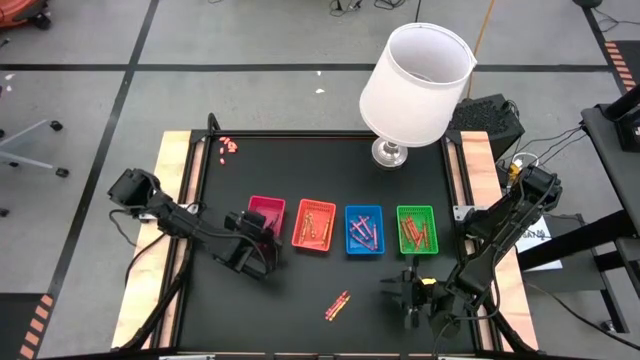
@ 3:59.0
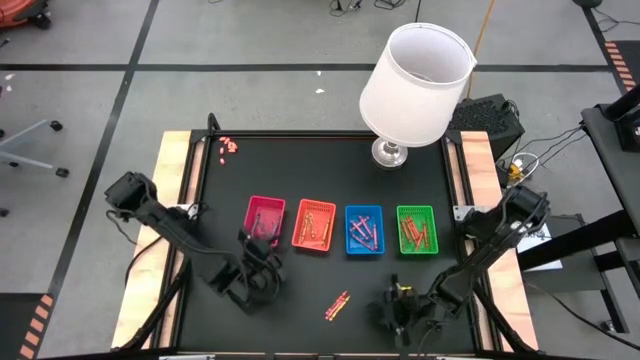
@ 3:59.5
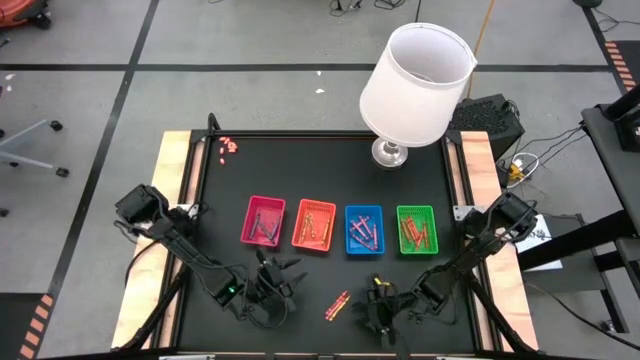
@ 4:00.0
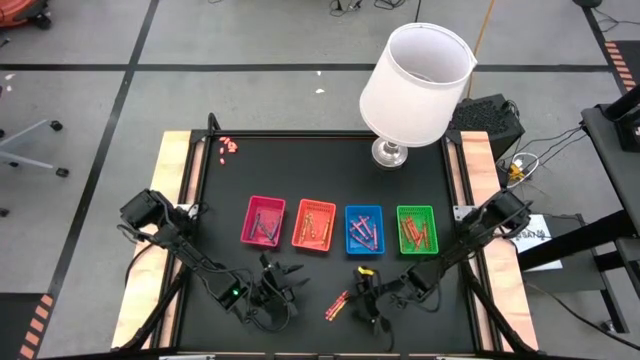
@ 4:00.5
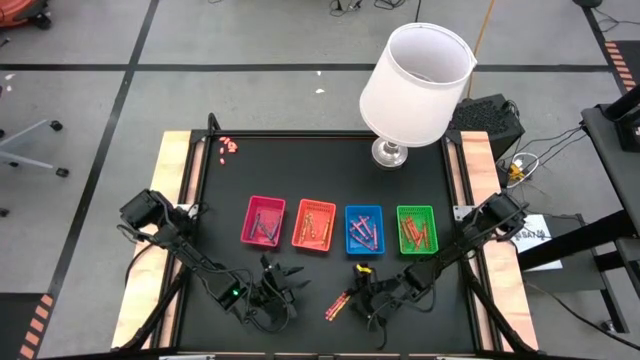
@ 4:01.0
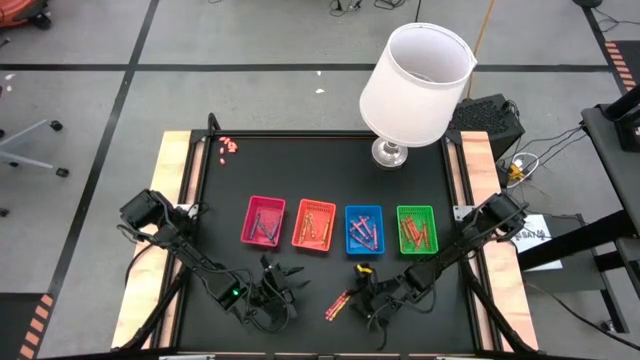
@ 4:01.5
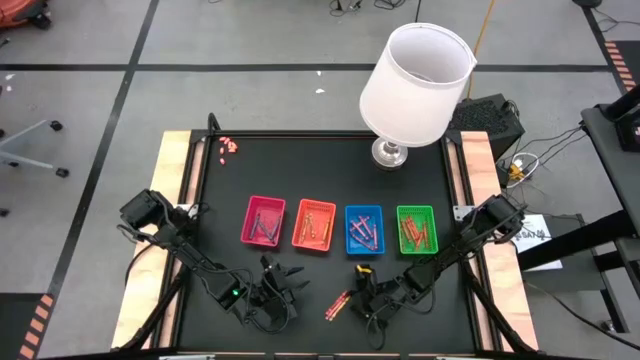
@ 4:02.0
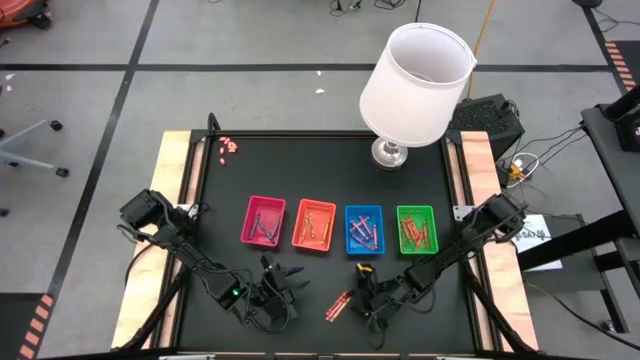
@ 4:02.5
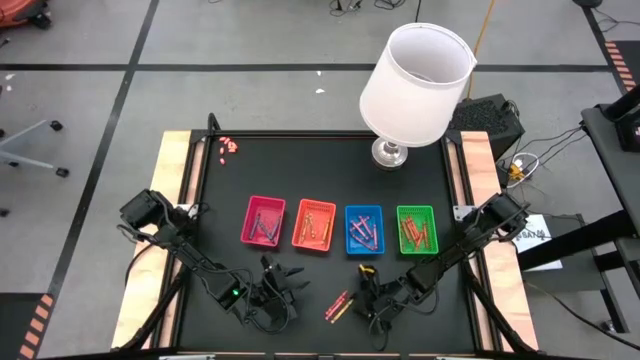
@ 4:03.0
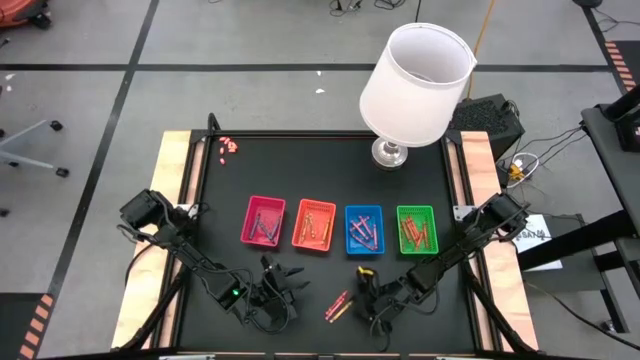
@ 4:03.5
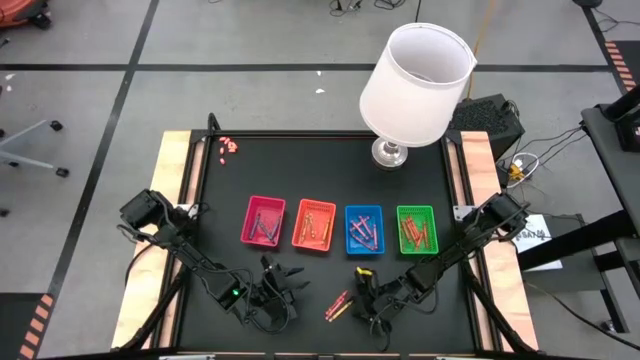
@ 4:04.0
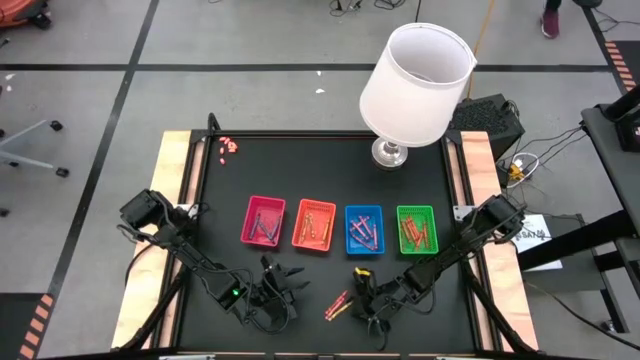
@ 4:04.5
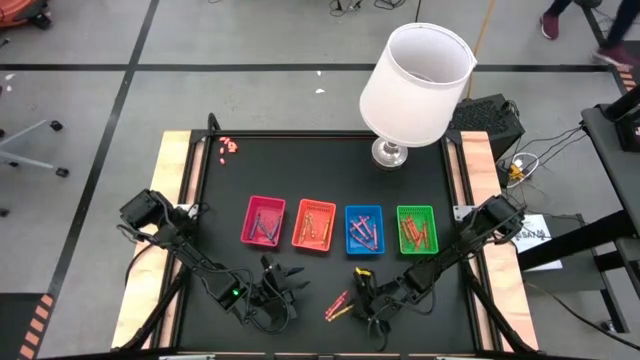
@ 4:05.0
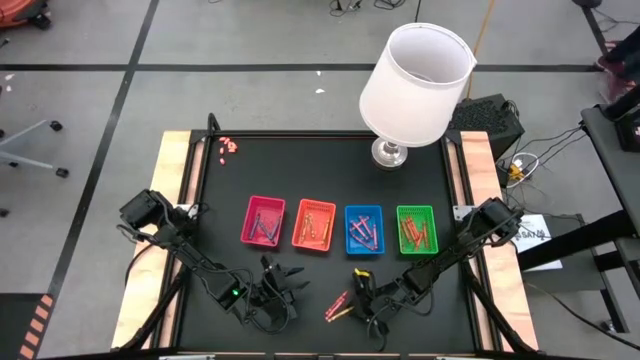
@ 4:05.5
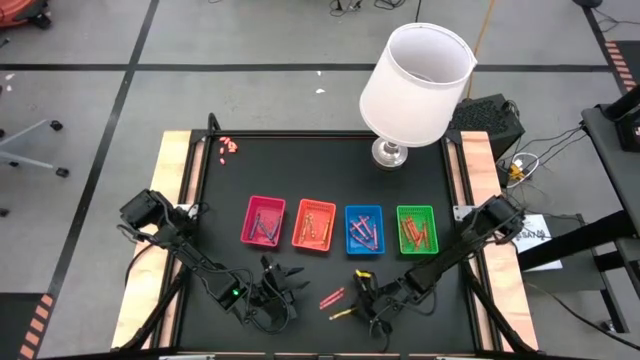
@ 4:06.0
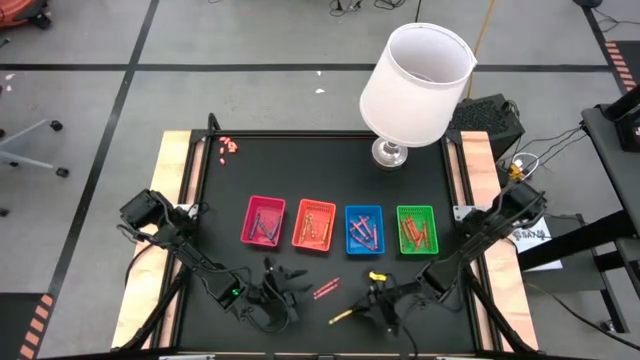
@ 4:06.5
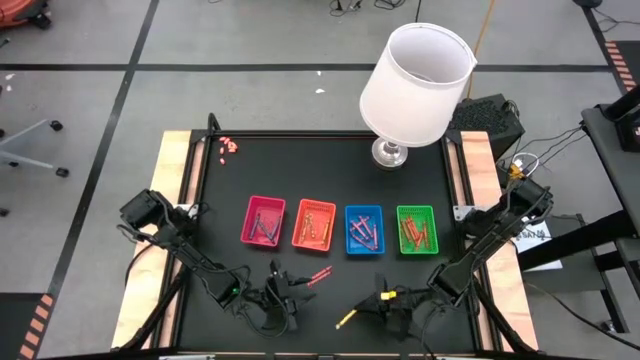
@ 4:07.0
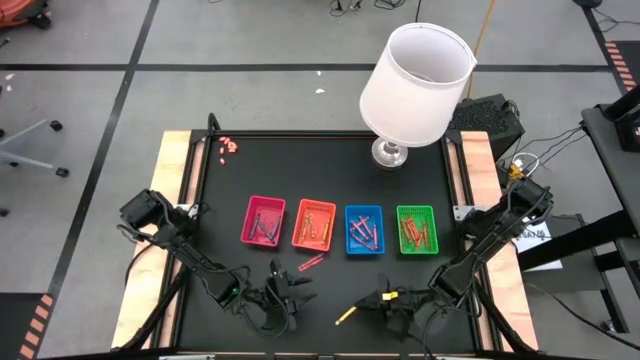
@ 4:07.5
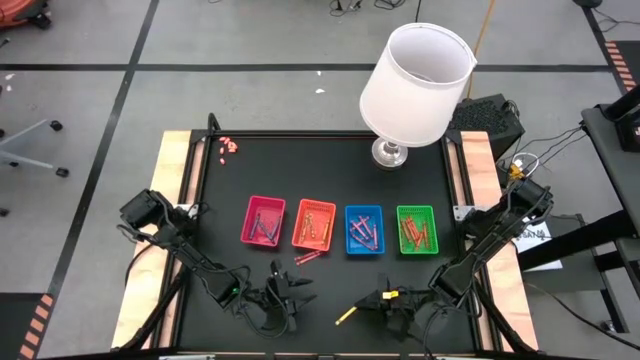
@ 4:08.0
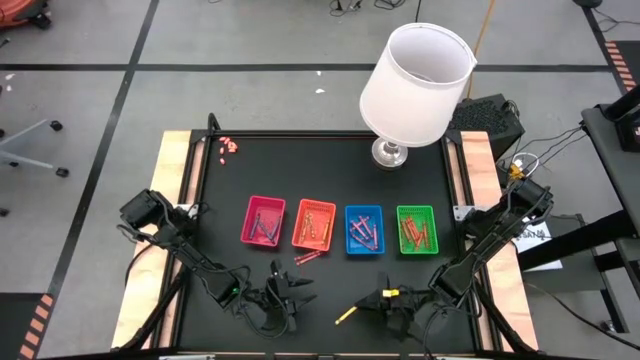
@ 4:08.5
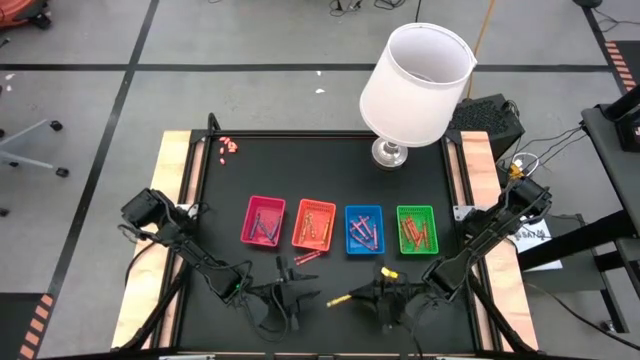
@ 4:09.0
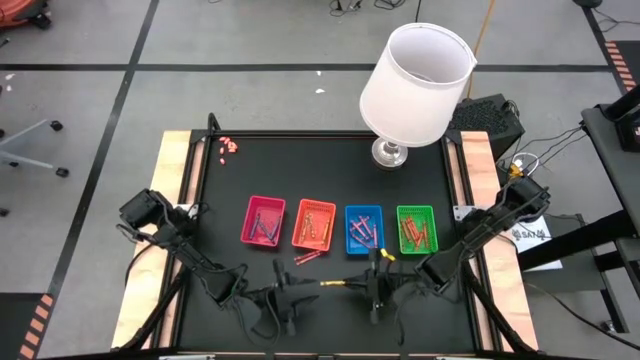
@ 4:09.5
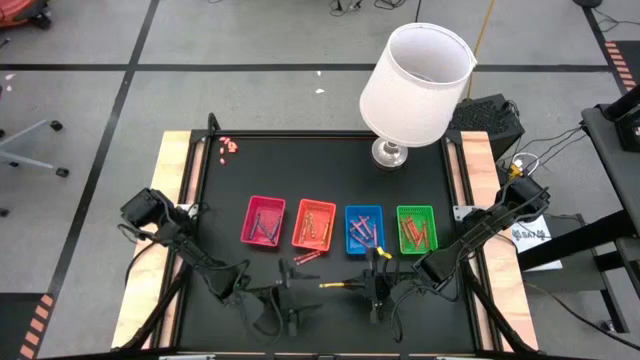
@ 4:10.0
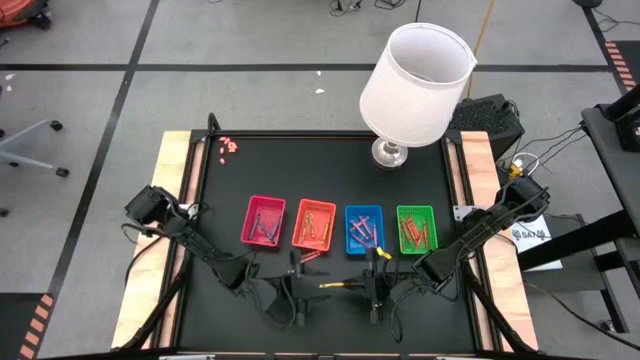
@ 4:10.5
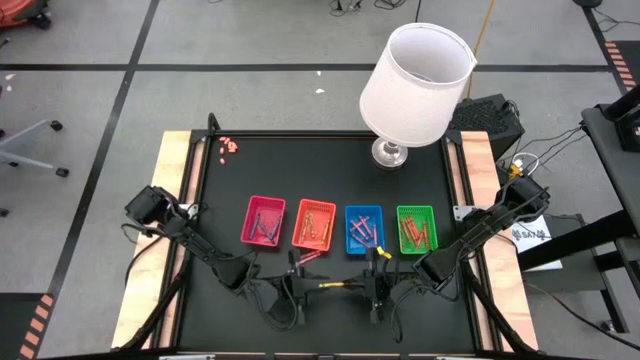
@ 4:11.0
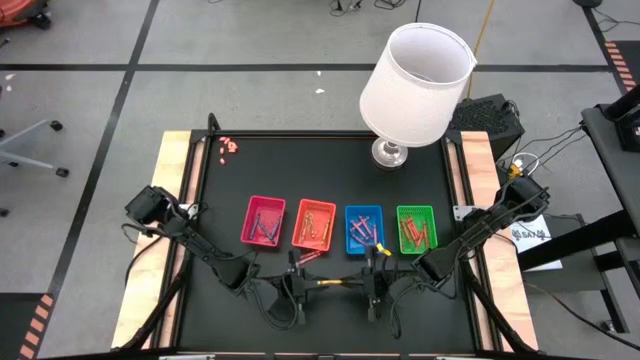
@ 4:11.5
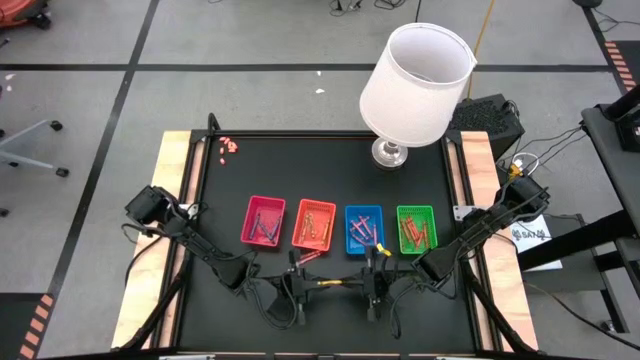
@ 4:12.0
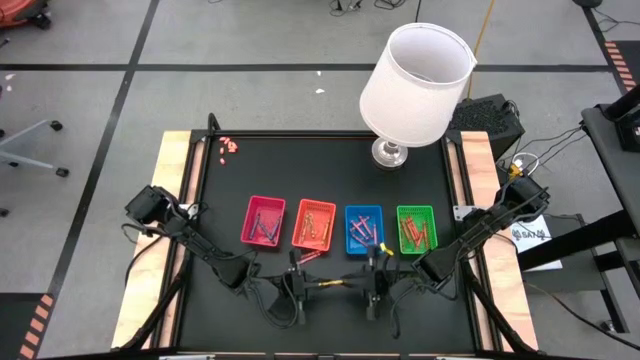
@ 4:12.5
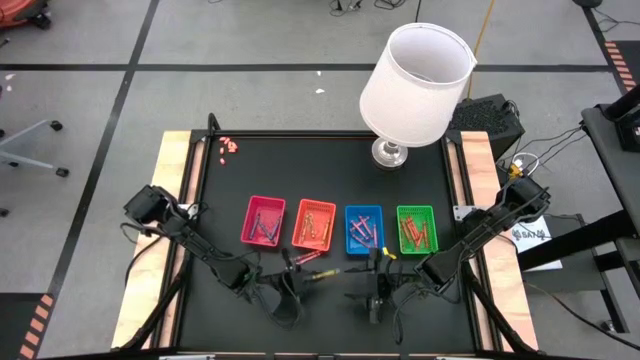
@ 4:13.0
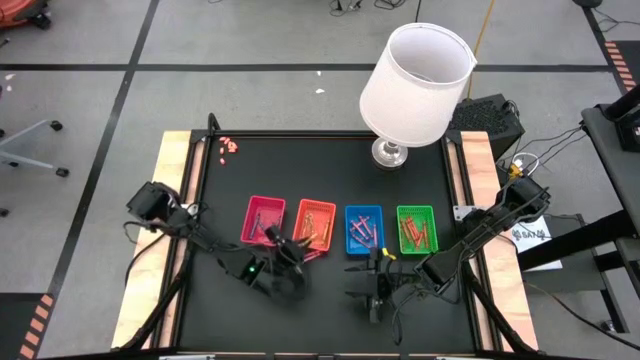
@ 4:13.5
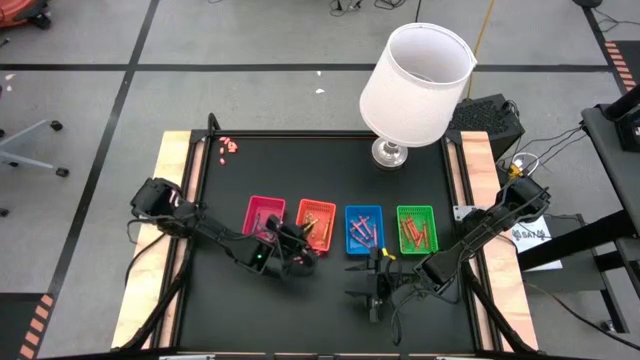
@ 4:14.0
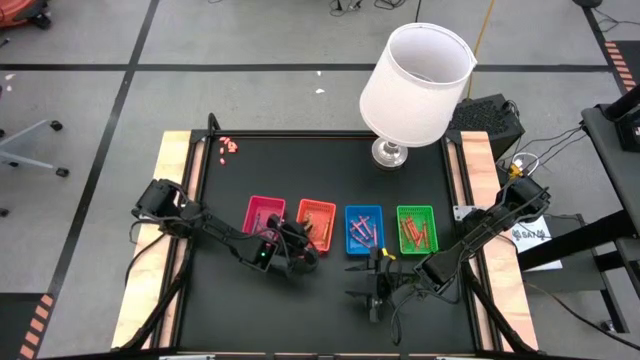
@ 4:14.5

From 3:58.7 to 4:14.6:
Task: Sort crayons
Put the yellow crayon into the orange bin

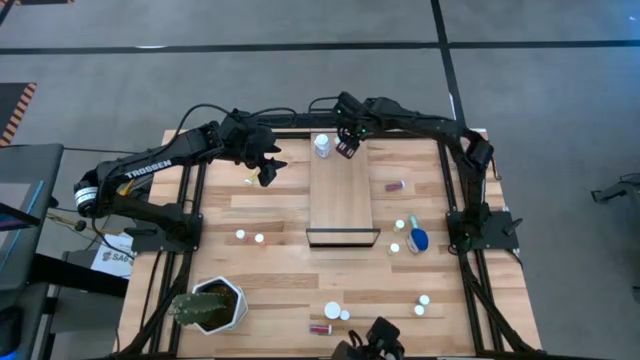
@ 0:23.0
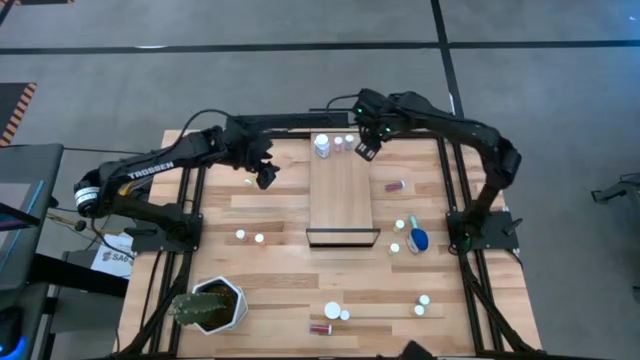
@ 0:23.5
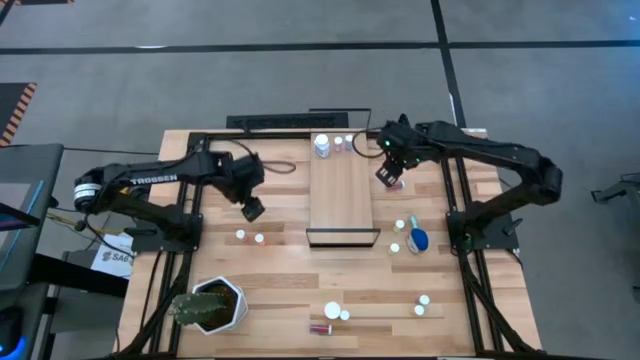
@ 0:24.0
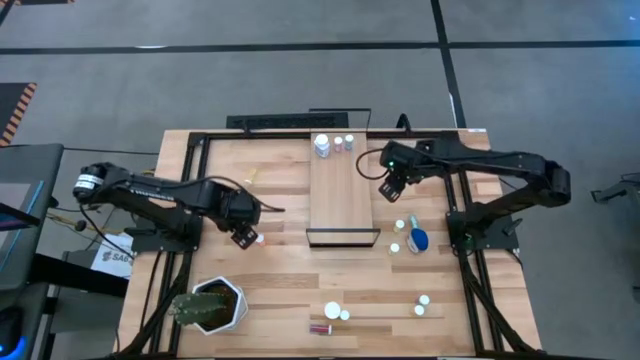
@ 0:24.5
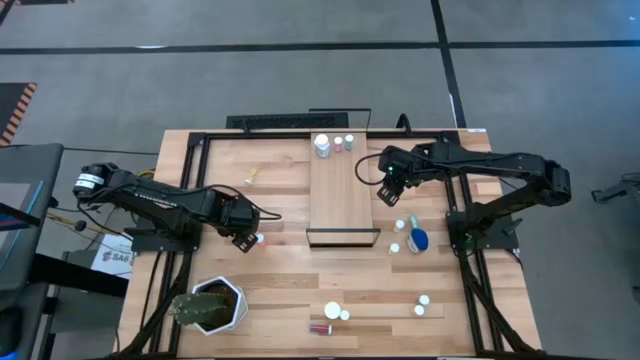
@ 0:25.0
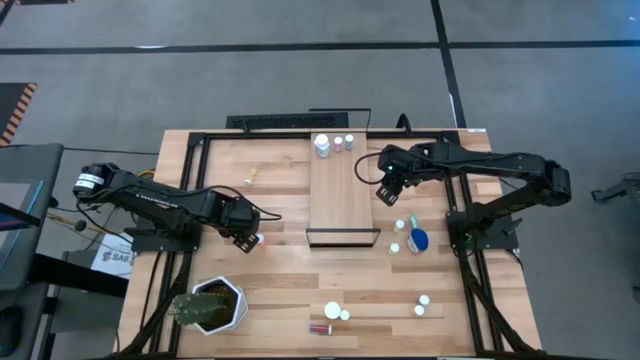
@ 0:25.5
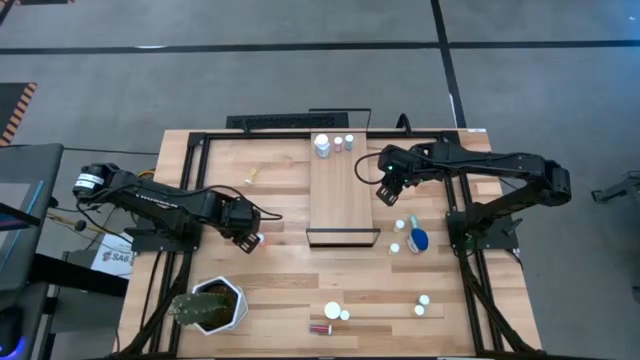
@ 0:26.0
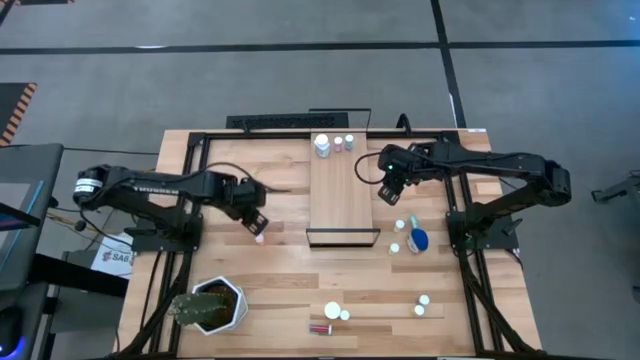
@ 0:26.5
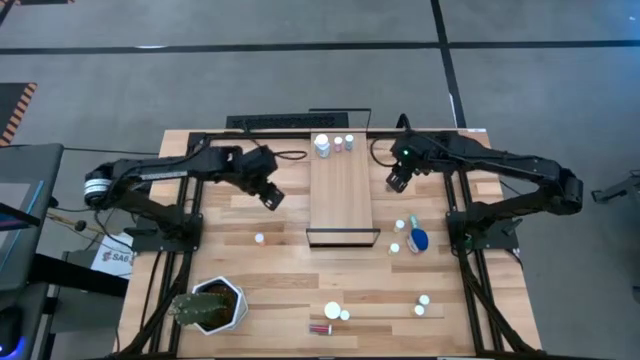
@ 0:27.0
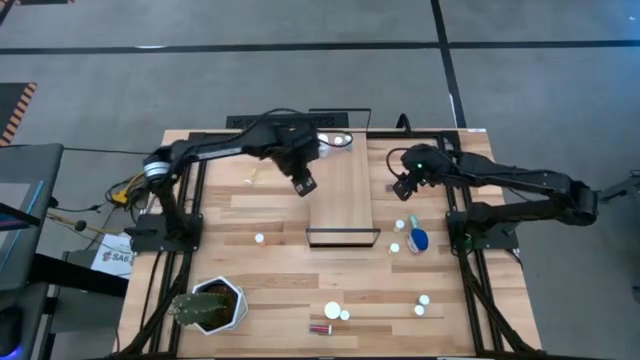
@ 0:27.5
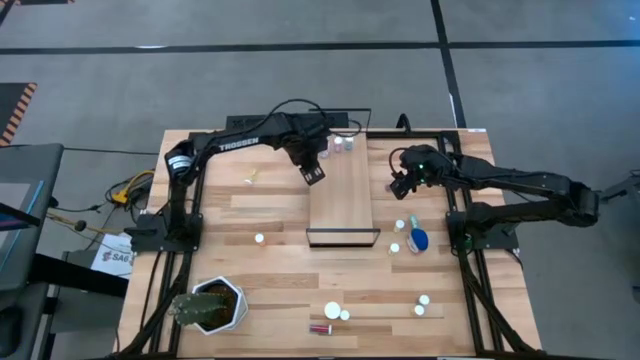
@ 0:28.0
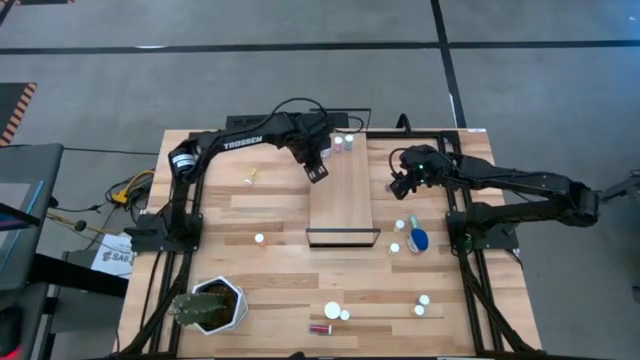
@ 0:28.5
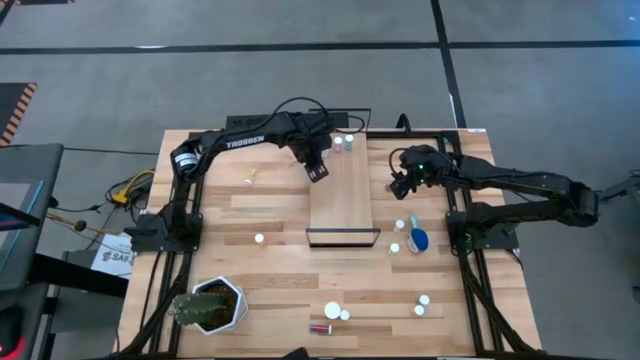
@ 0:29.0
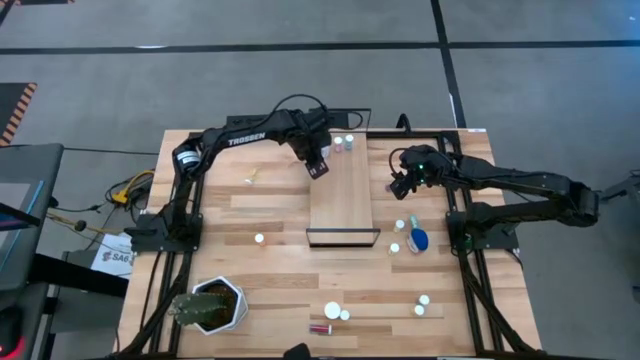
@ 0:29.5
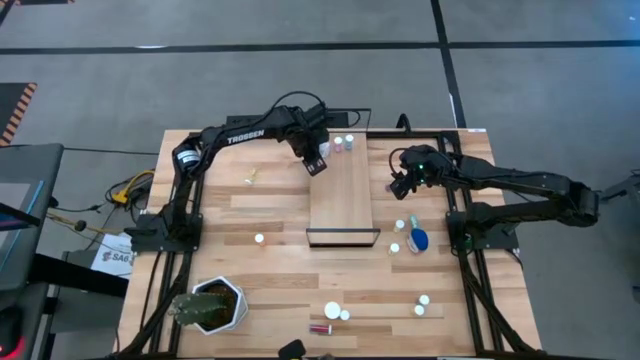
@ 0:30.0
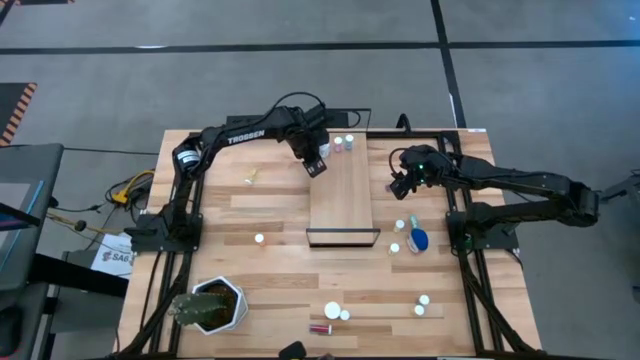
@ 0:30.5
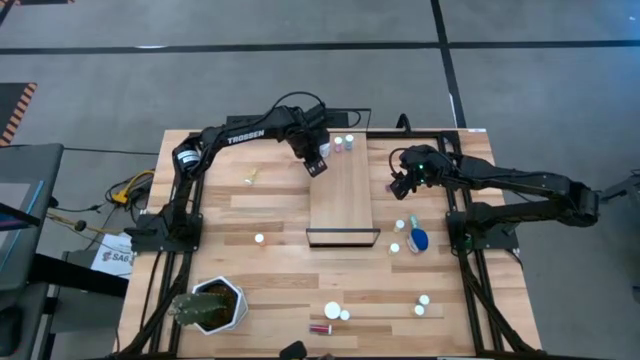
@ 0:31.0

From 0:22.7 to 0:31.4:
Task: Pick and place medicine bottles onto shelf by color
Put the pink pill bottle on the shelf
